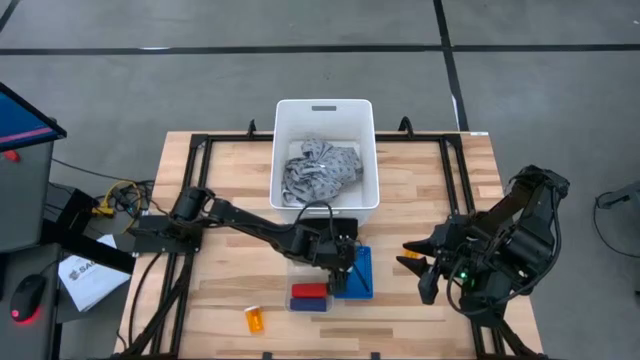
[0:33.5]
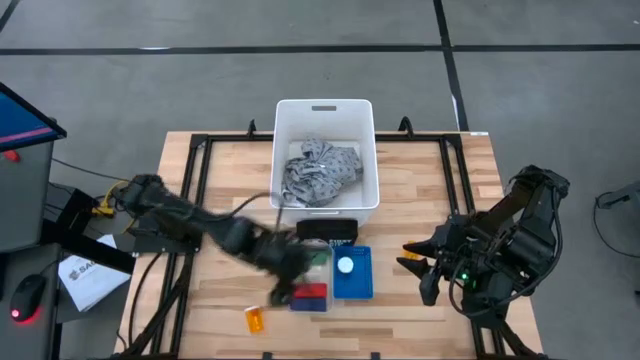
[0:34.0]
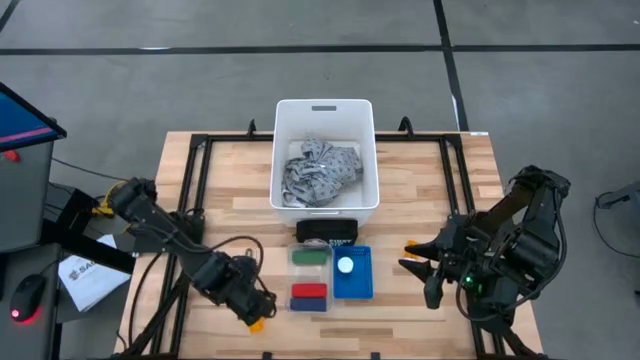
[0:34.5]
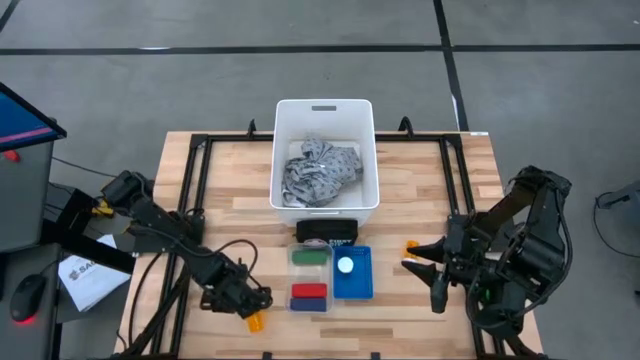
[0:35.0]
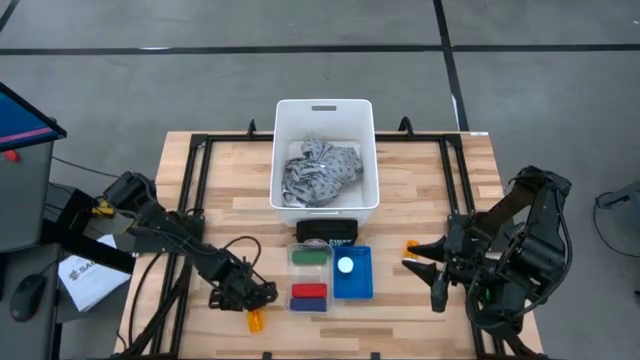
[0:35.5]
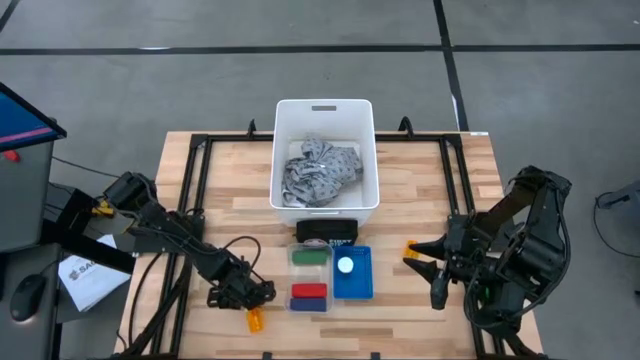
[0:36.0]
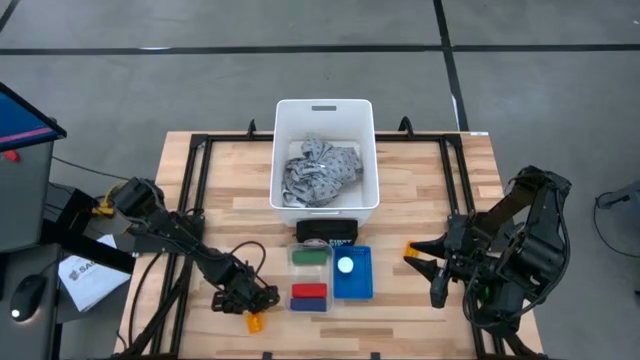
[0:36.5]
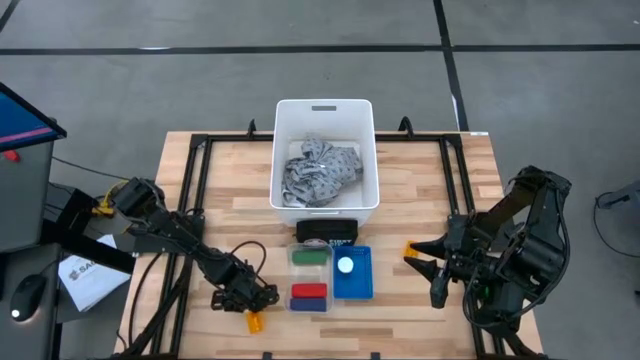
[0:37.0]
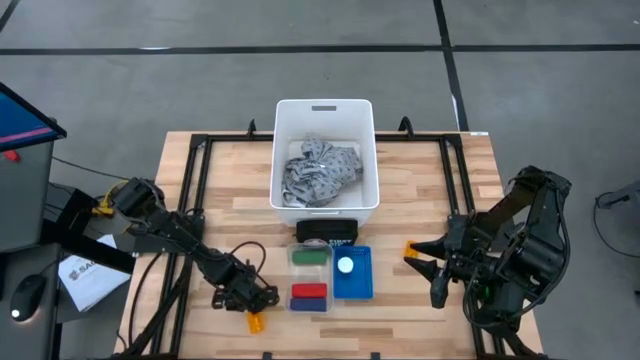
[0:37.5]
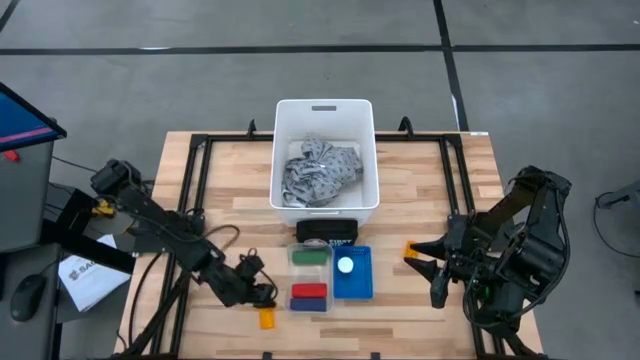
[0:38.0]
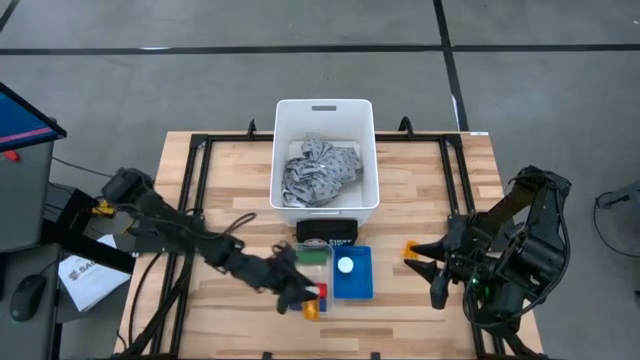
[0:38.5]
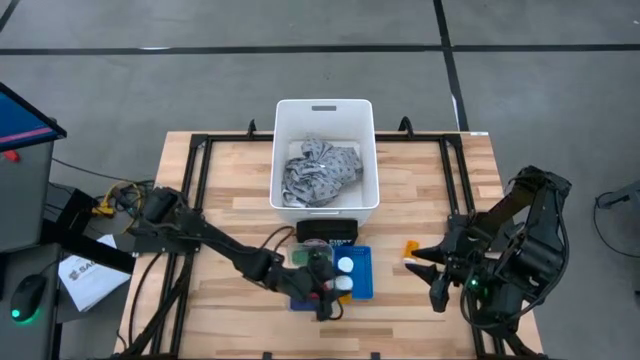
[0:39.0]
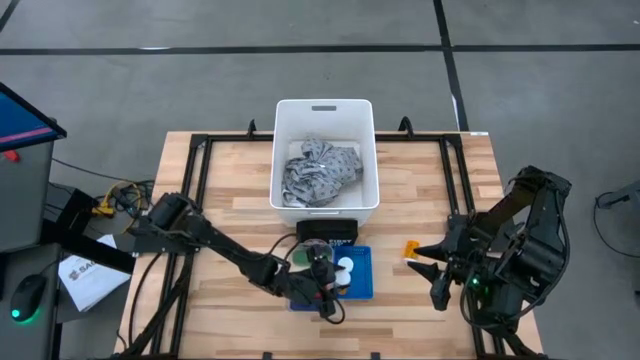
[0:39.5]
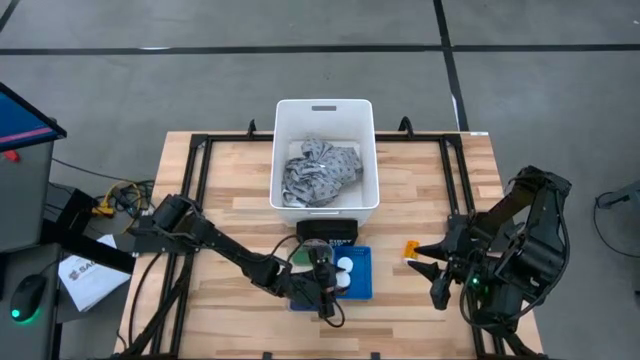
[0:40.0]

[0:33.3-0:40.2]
Task: Pick & place medical supplies in basket/bin
Put the bottom orange pill bottle into the blue bin

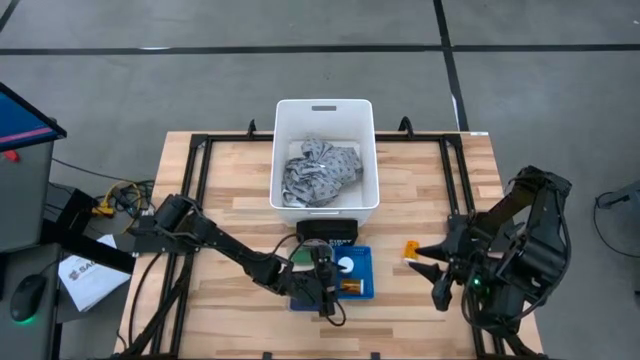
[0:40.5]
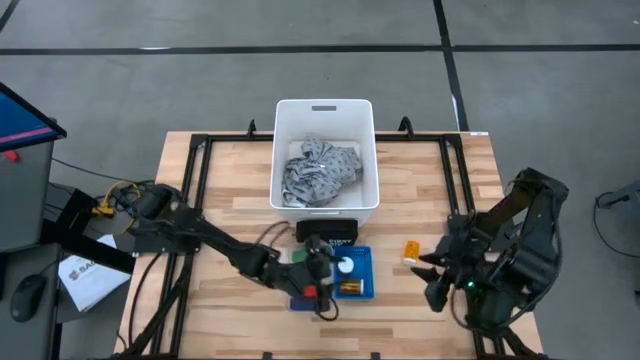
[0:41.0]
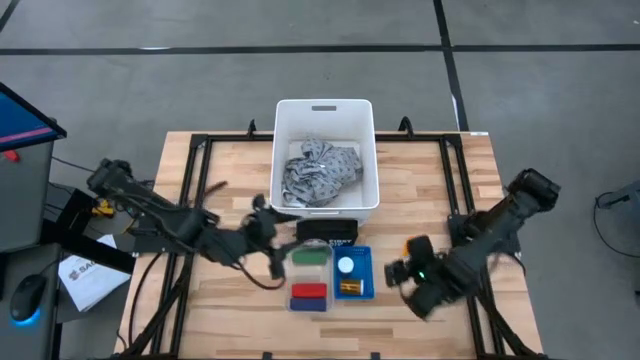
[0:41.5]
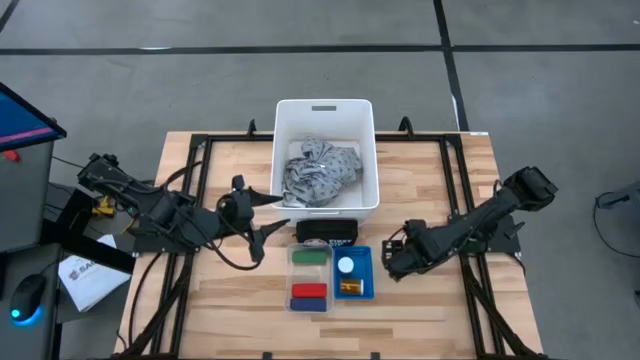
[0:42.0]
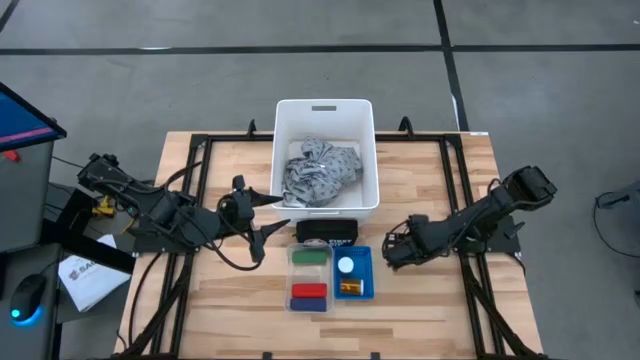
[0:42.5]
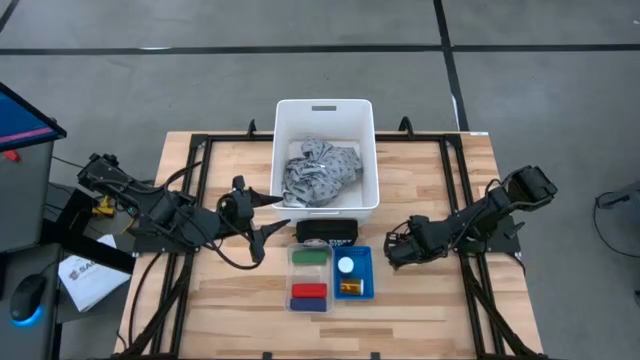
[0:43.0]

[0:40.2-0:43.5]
Put the orange pill bottle into the blue bin

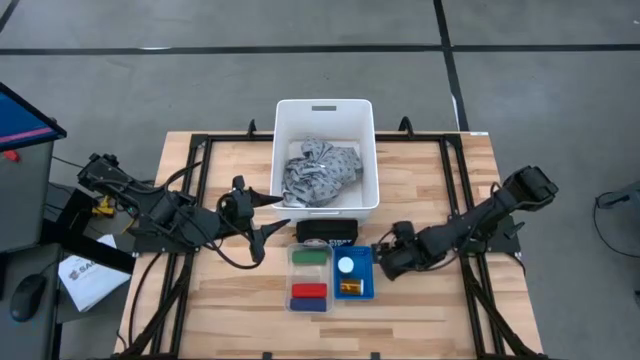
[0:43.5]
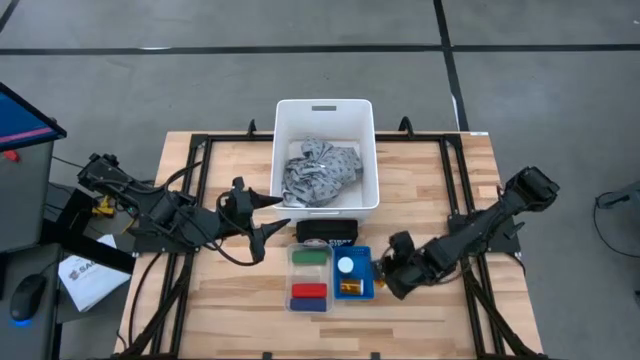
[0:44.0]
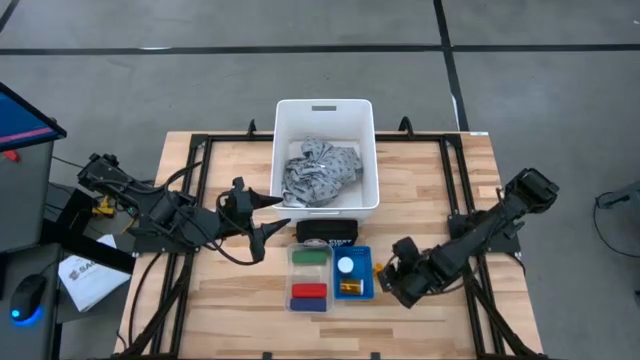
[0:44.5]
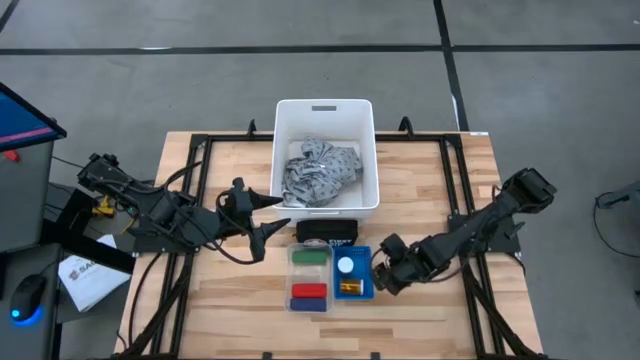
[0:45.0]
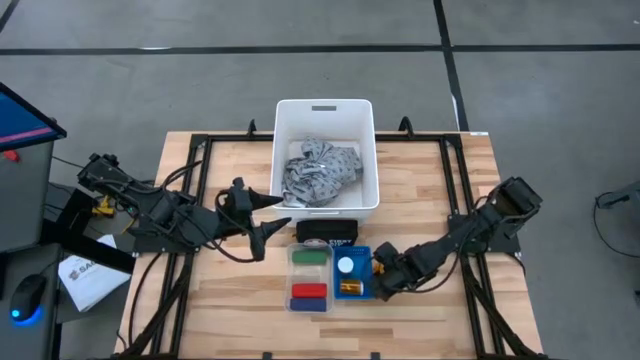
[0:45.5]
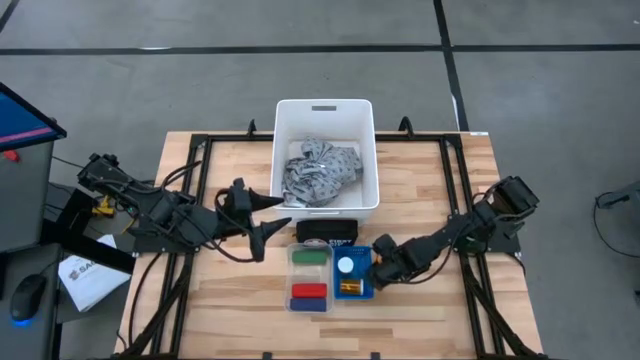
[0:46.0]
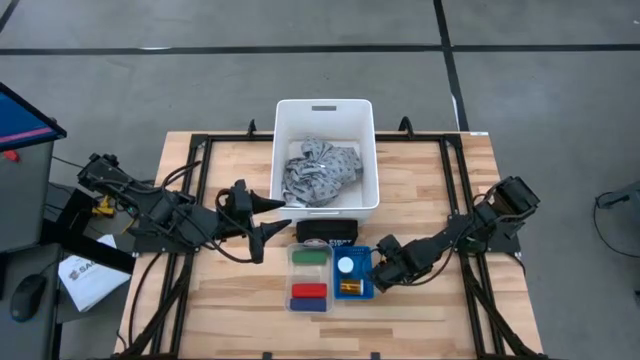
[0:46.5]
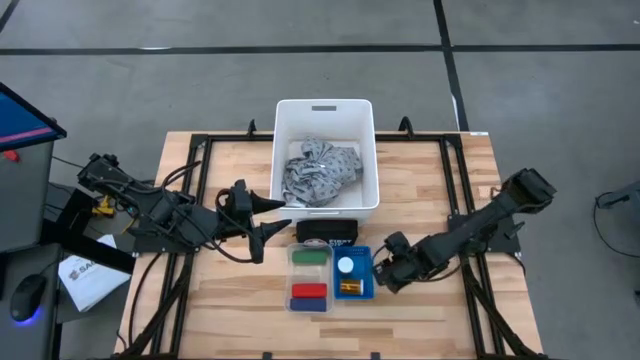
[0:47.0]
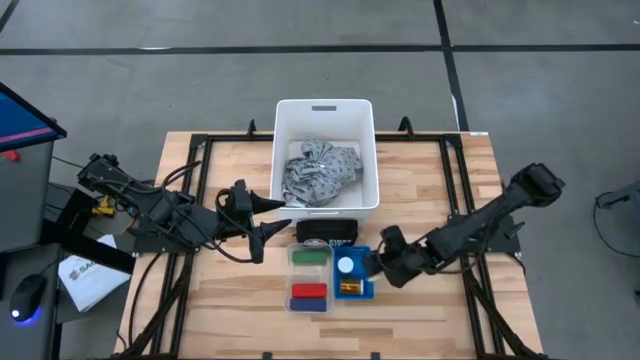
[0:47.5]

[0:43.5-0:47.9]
Put the orange pill bottle into the blue bin

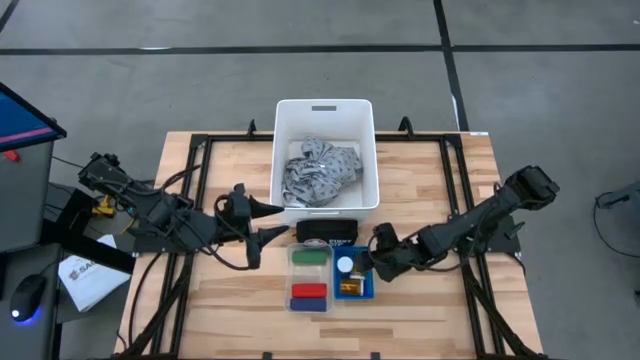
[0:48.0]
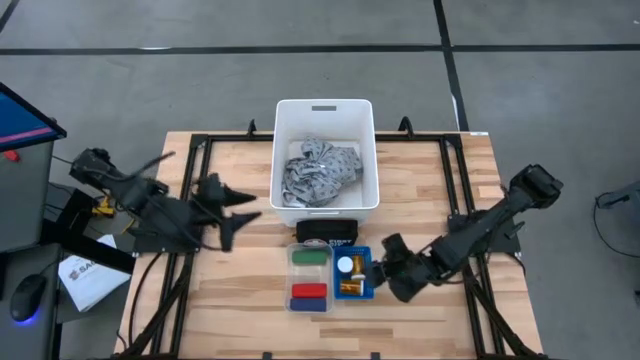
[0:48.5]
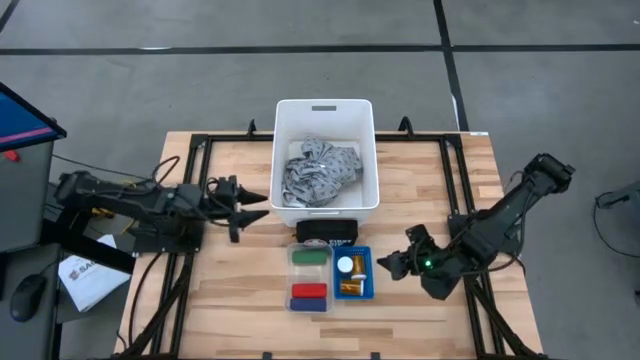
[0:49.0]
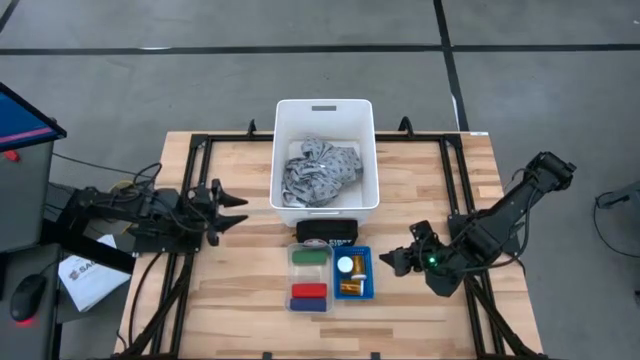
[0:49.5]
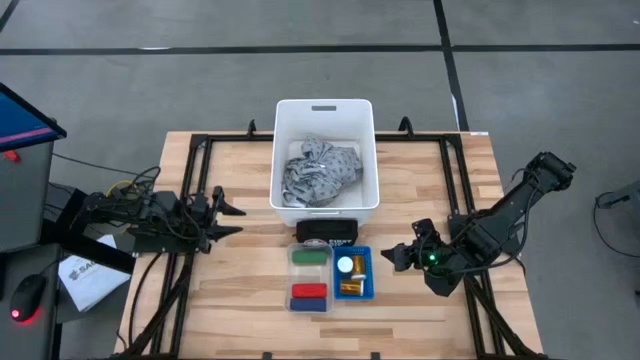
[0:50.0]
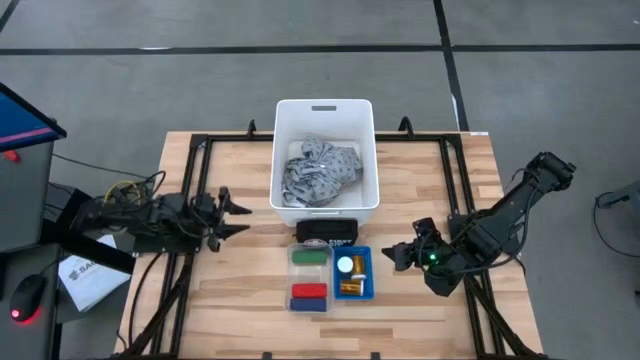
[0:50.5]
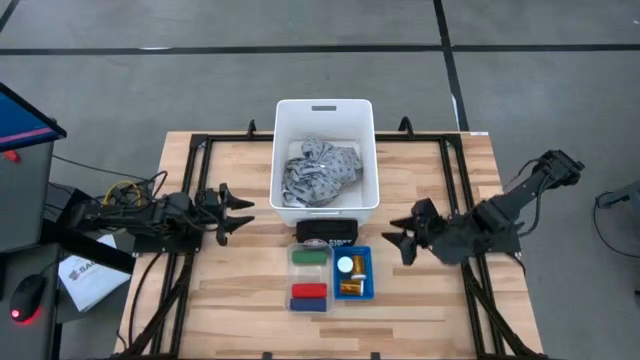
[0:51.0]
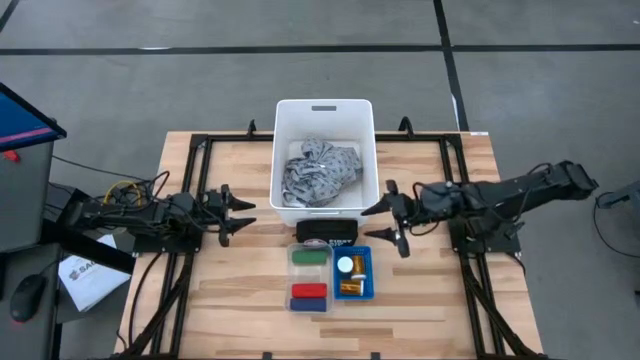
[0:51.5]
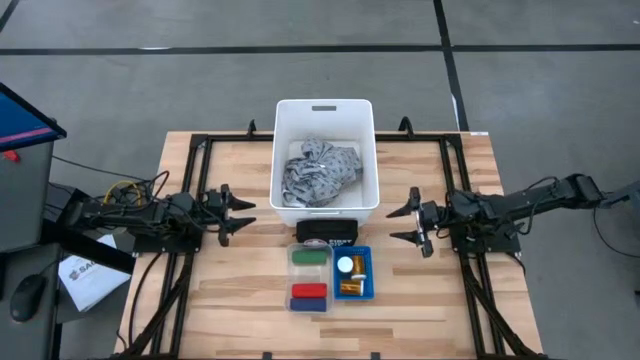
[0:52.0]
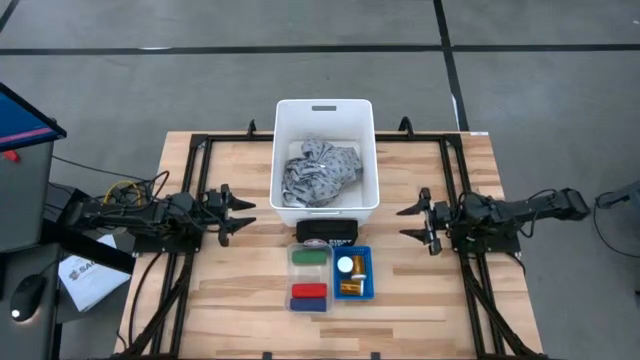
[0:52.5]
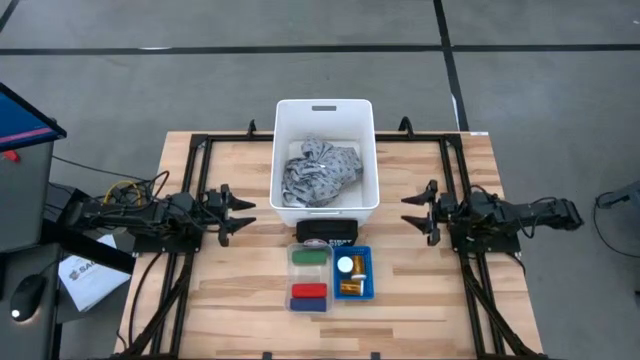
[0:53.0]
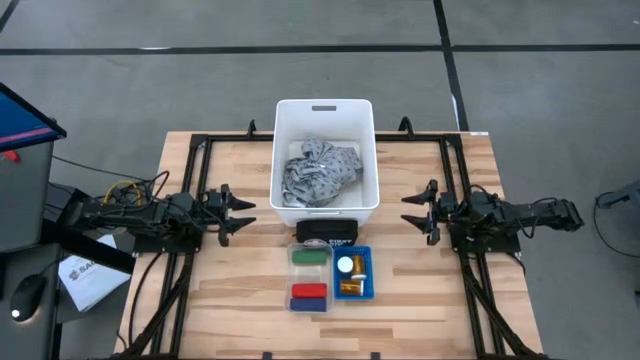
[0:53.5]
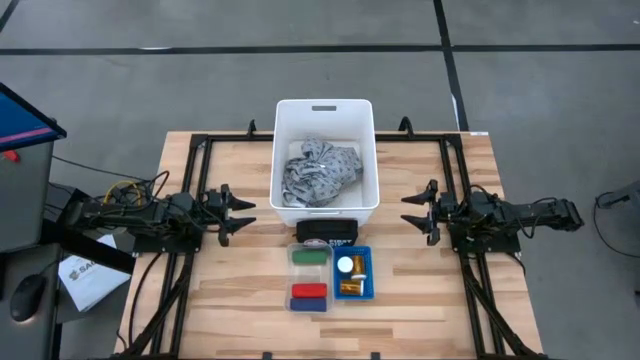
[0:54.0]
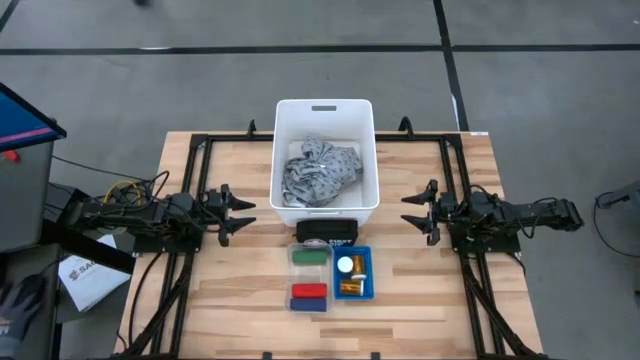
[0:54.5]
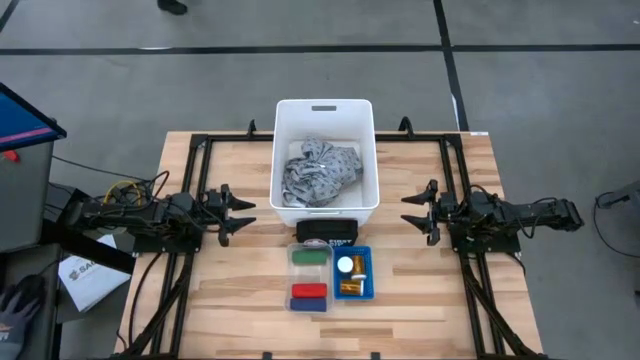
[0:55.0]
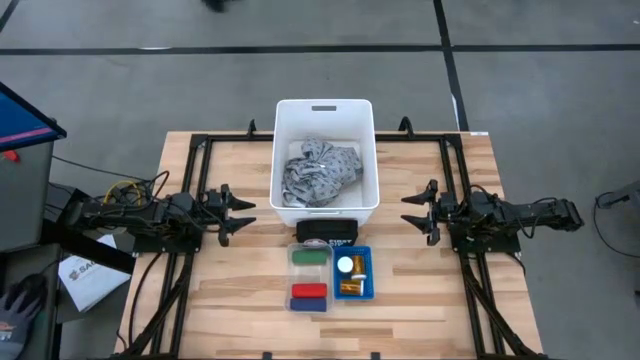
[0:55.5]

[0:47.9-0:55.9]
Return to Home Position
